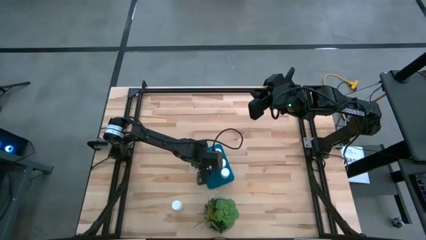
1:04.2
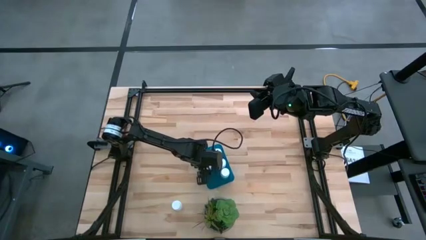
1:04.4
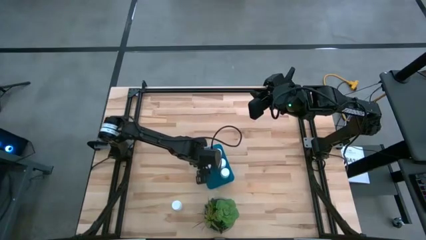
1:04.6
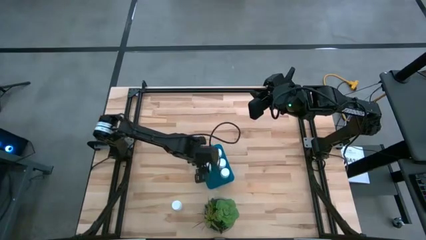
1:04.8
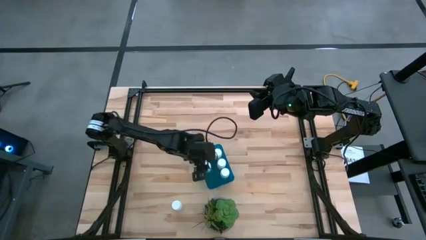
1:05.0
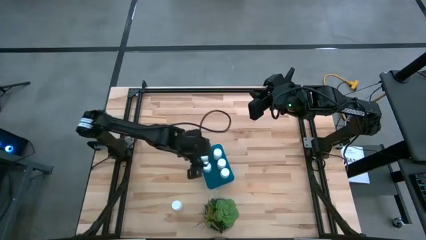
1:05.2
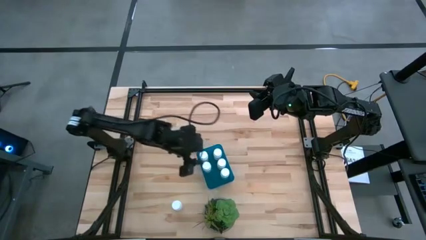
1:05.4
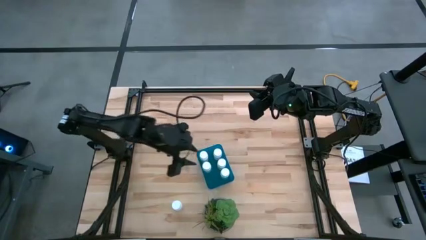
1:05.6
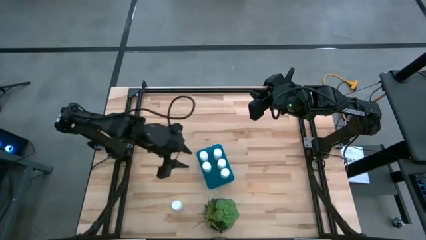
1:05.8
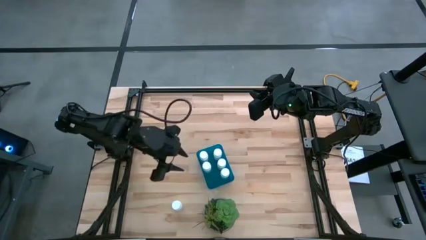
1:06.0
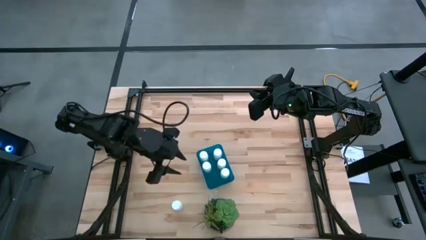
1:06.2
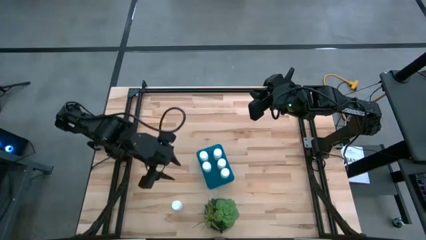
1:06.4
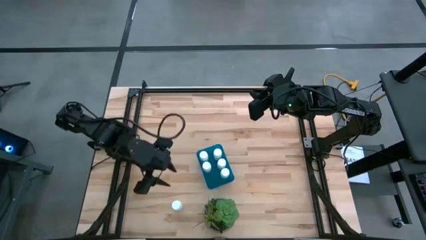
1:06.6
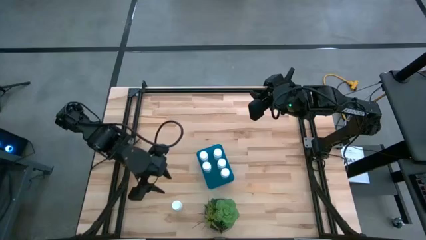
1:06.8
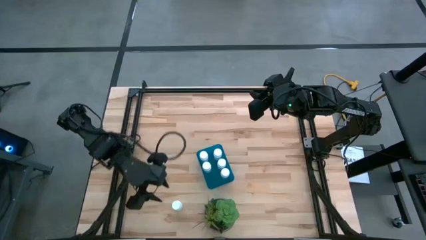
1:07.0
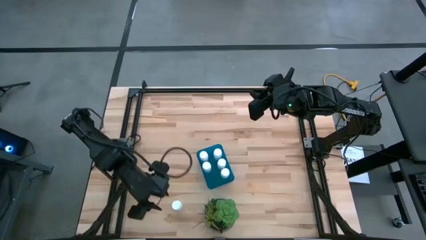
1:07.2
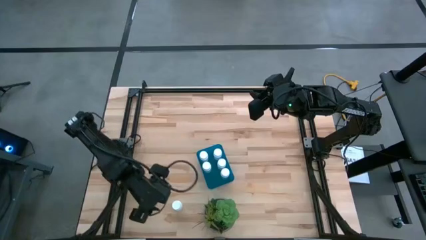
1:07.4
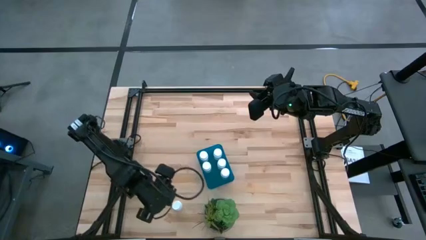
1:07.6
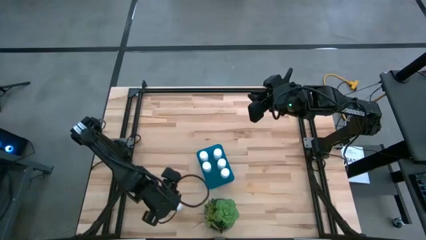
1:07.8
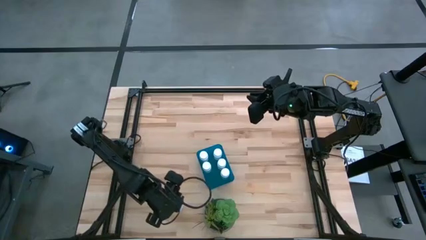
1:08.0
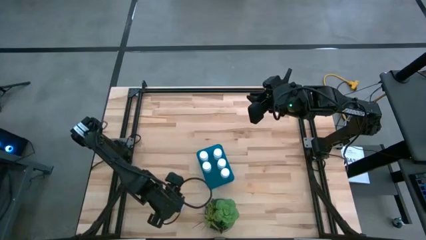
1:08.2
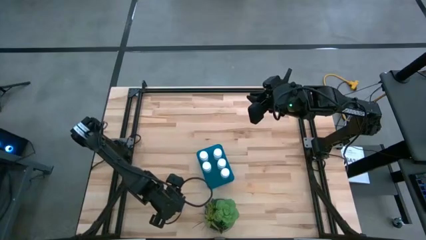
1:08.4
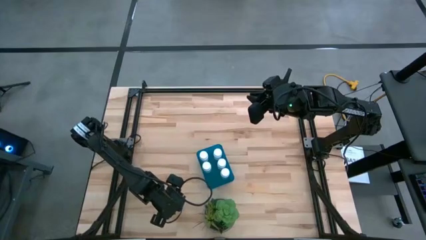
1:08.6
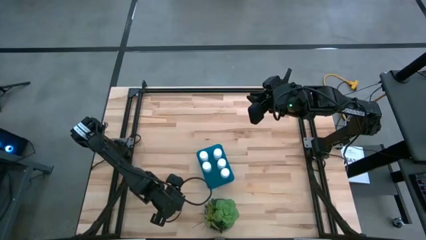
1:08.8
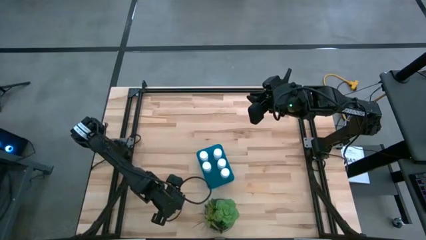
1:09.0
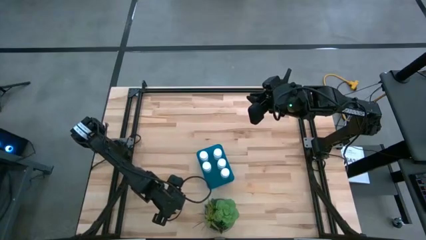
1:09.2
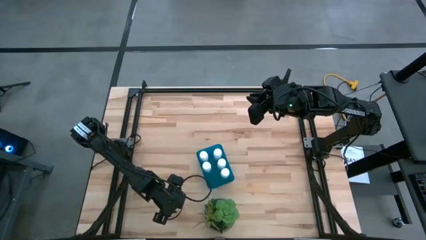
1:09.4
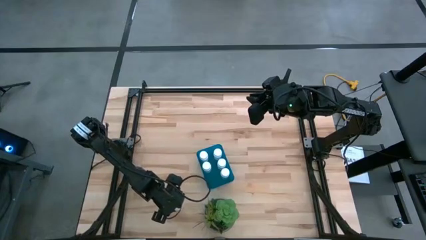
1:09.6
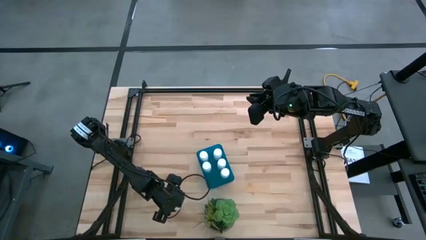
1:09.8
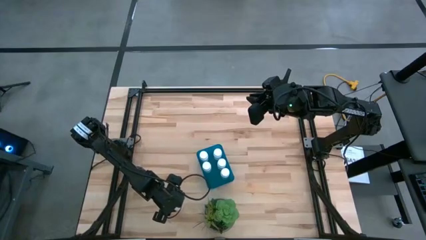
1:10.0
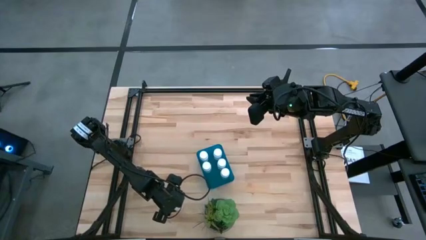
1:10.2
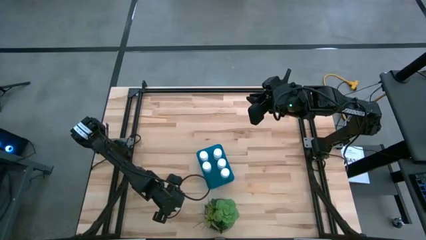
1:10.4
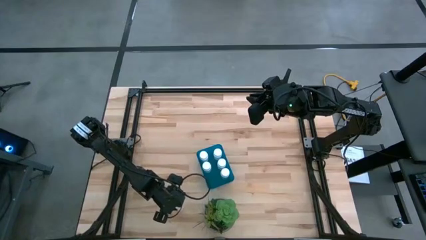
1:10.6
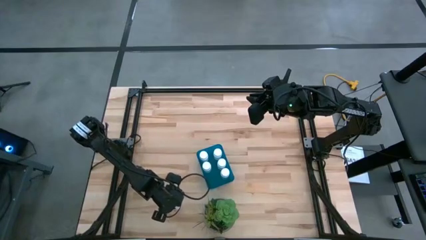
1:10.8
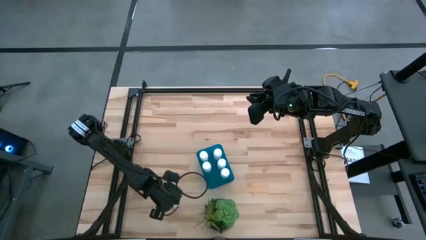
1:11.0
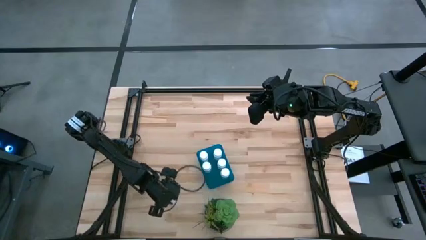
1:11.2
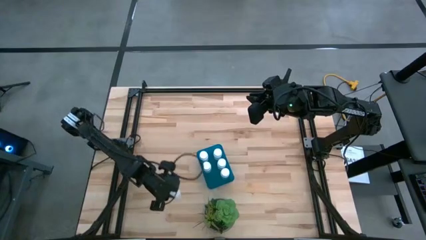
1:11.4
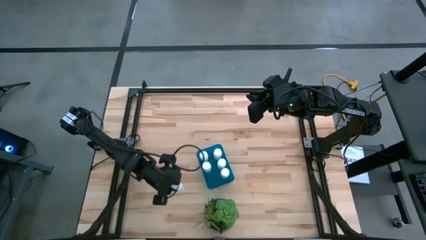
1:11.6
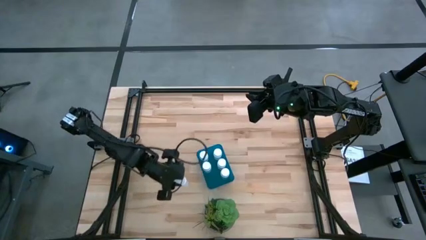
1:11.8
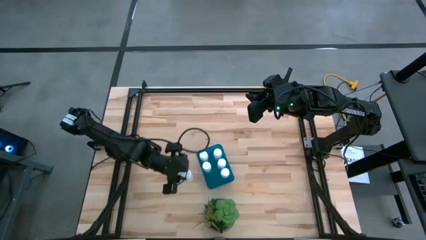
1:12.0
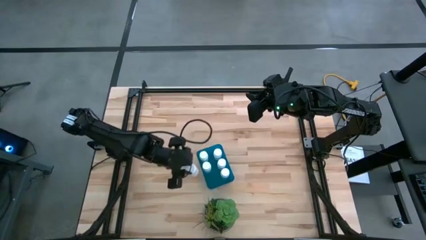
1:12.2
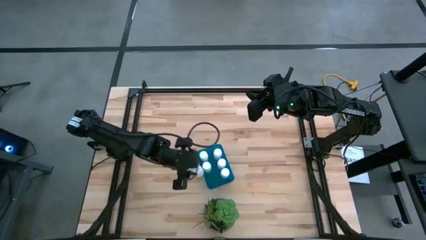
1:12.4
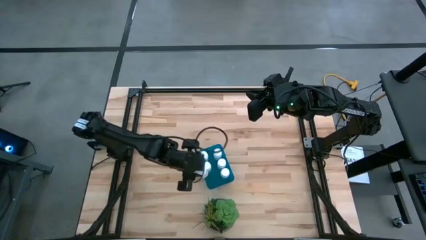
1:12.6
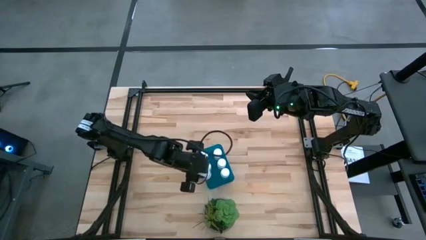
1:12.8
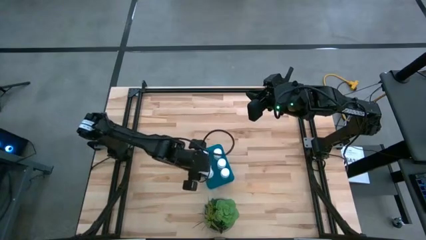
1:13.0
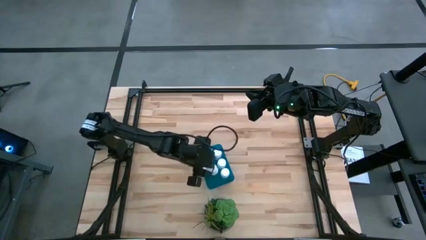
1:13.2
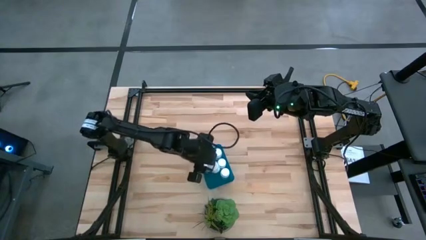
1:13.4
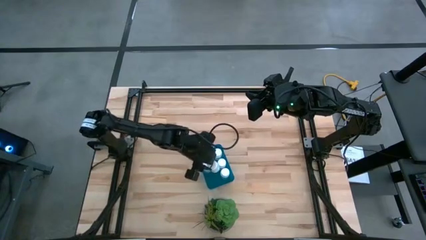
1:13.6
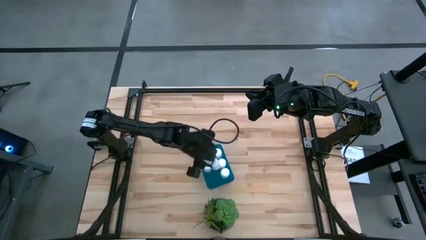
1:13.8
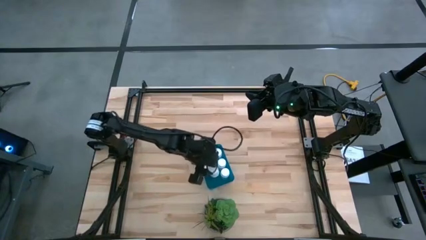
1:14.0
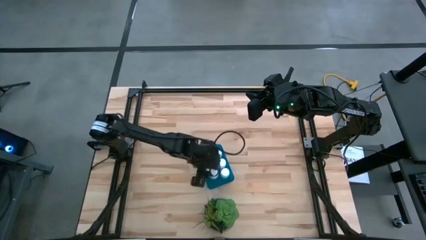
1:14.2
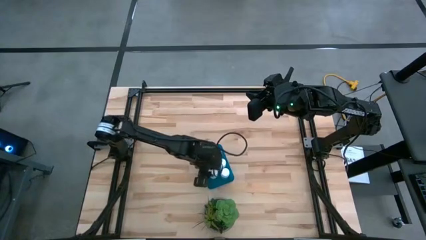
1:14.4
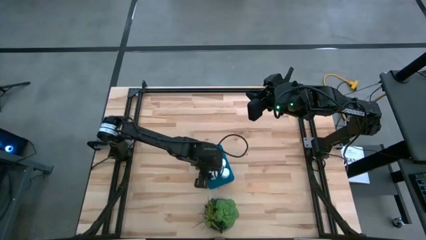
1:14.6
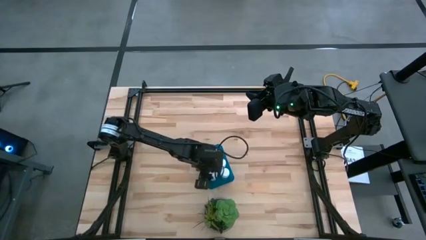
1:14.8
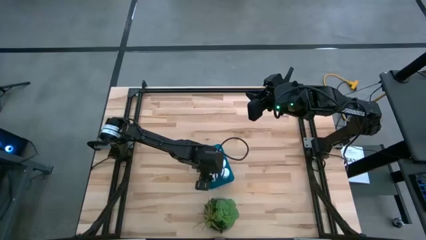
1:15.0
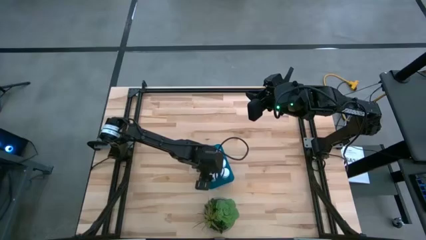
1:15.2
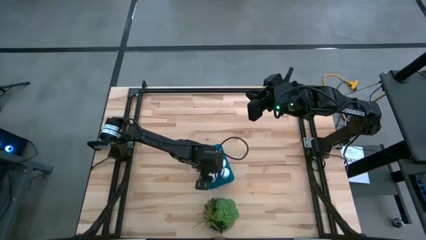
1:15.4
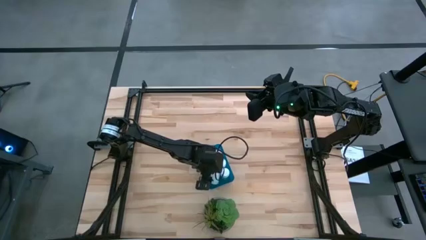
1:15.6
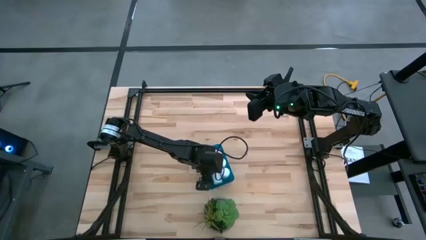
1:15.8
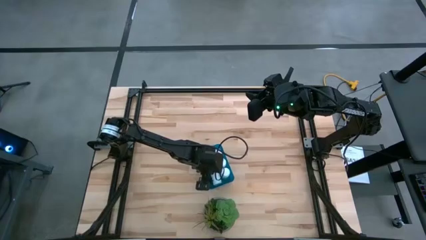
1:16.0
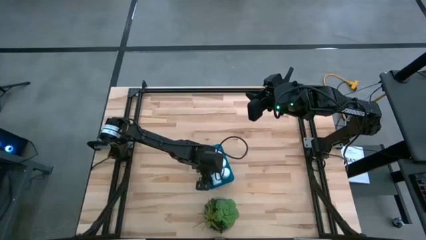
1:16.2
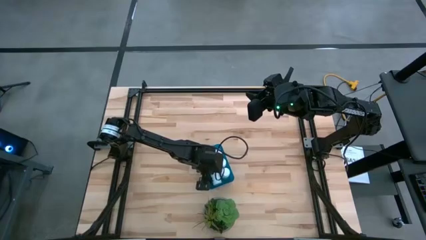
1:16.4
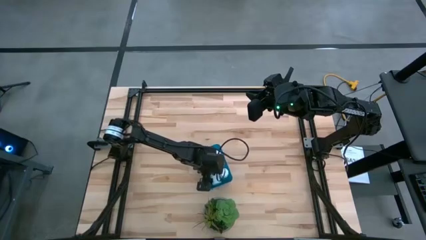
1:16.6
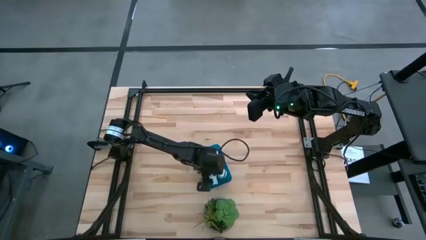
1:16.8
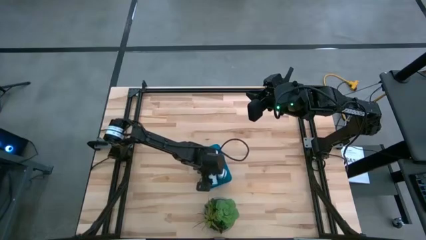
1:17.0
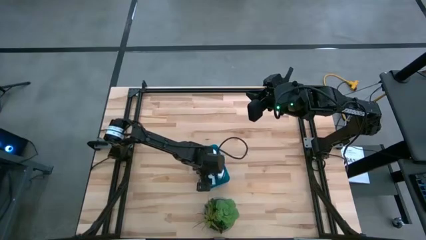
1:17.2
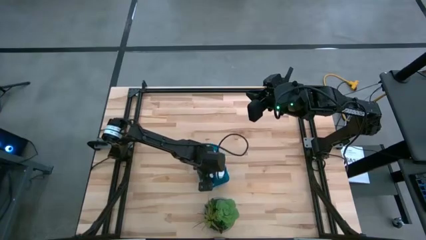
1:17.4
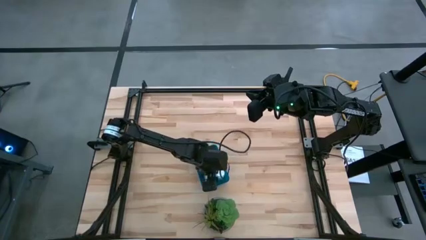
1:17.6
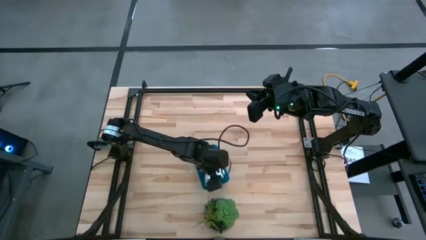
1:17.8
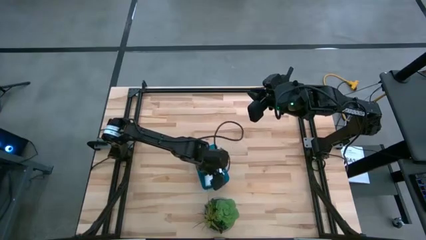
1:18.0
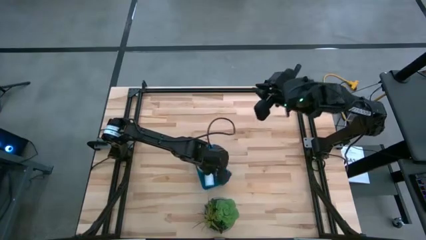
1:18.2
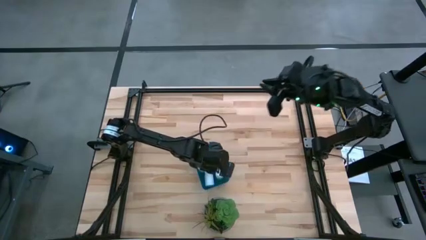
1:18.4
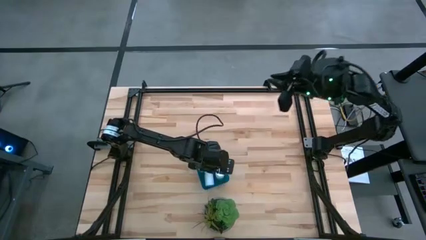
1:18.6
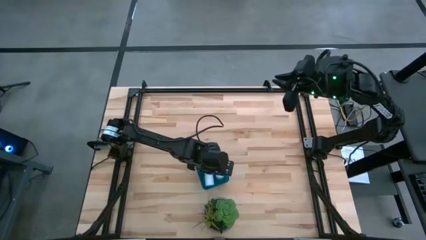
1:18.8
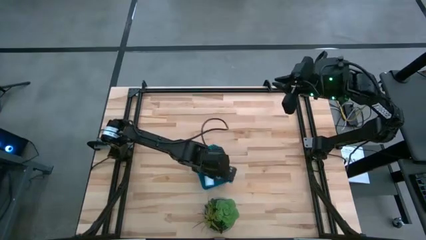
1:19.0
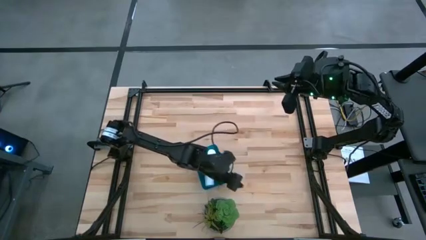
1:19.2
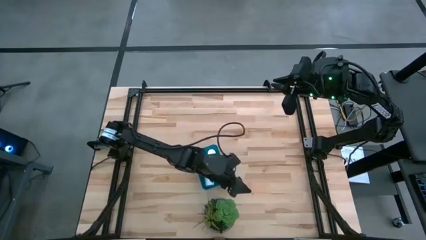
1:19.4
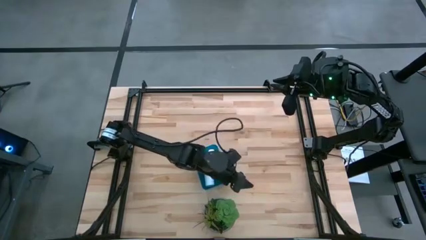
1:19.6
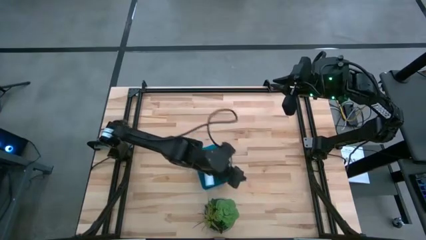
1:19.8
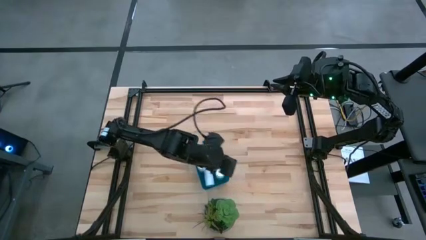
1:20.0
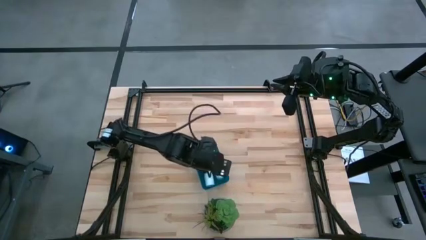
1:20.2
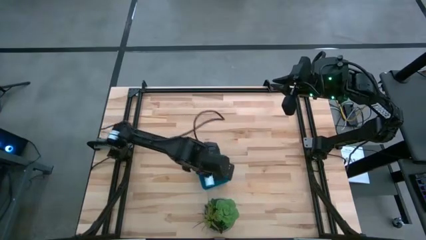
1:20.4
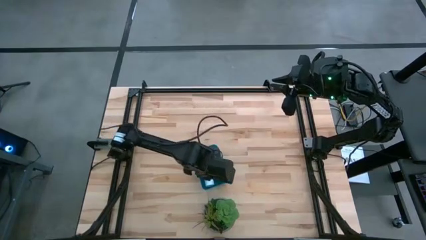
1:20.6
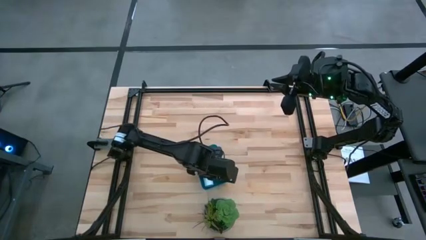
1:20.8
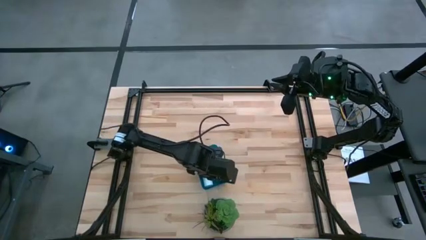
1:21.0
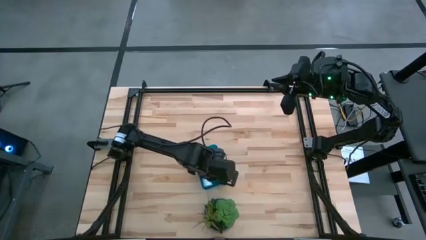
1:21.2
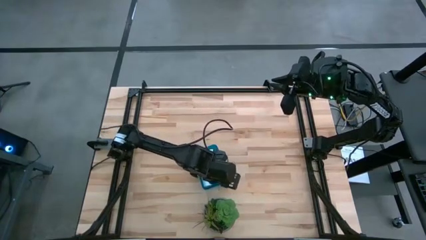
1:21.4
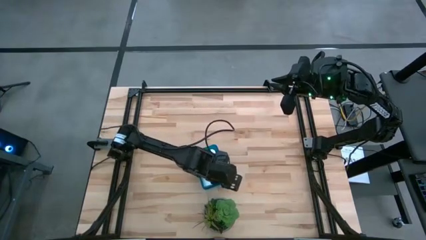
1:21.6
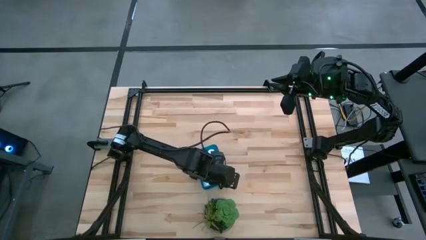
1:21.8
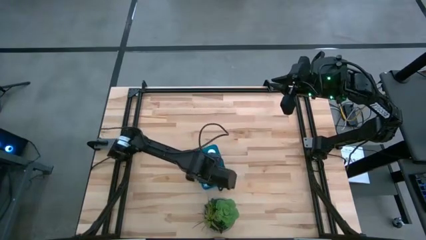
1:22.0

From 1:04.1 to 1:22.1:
Task: Pick and place pill bottles into a basket
Put the medicine bottle into the container
